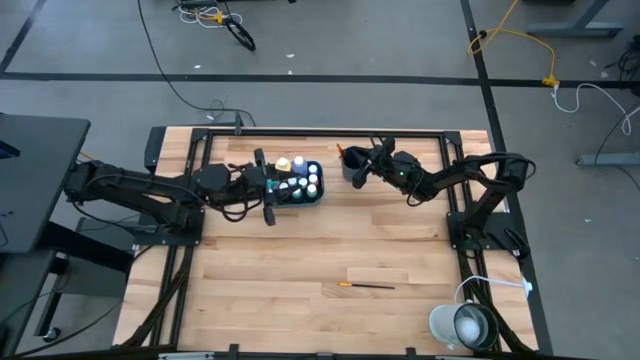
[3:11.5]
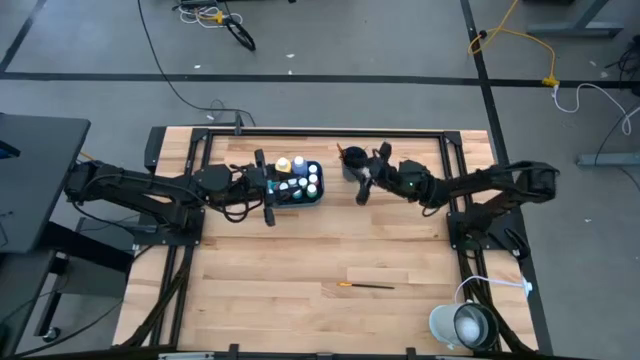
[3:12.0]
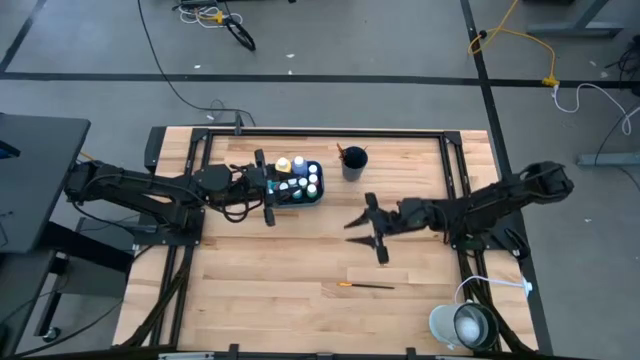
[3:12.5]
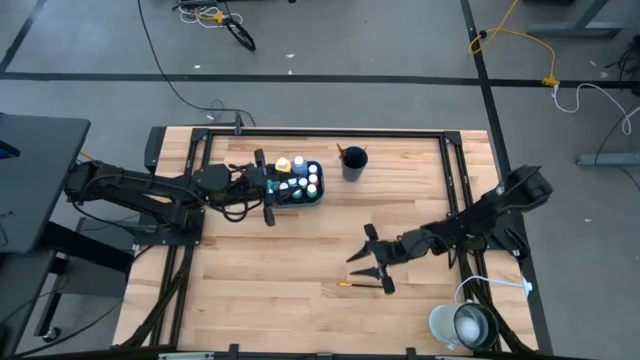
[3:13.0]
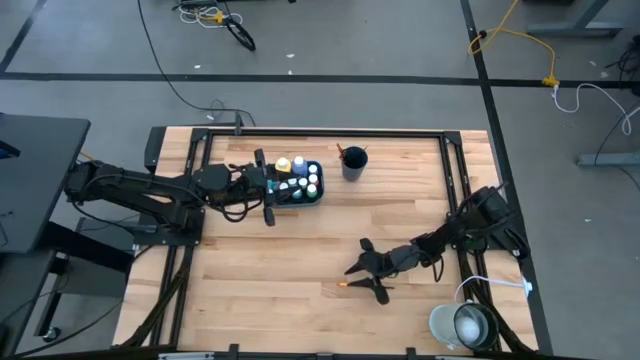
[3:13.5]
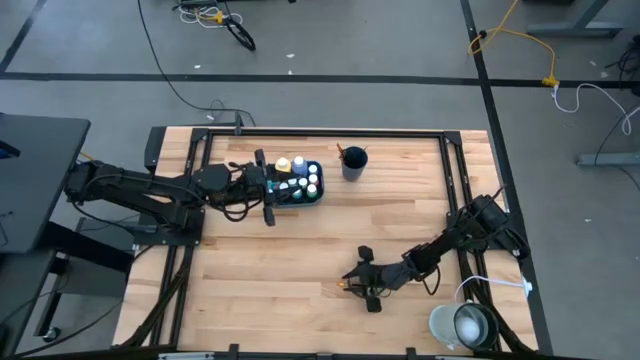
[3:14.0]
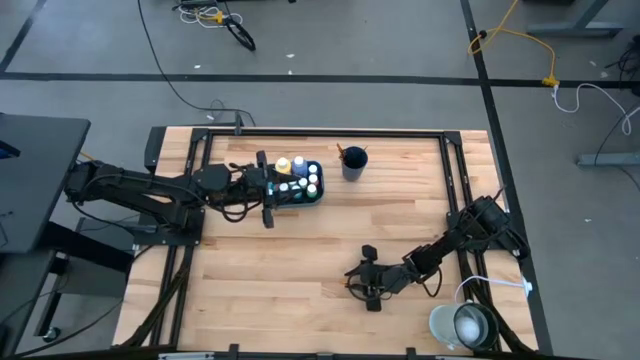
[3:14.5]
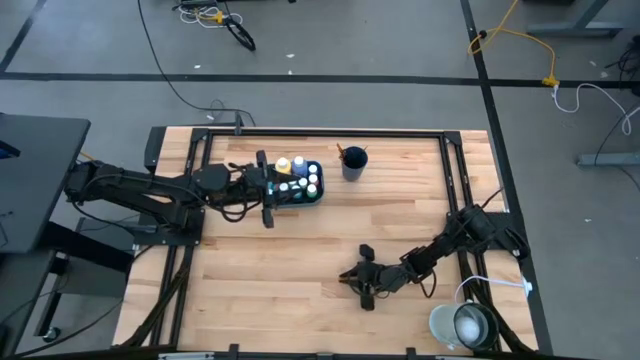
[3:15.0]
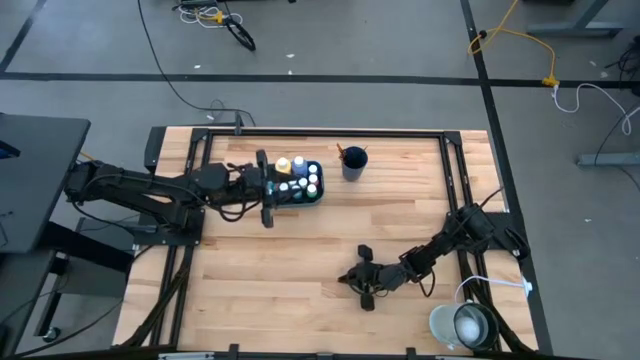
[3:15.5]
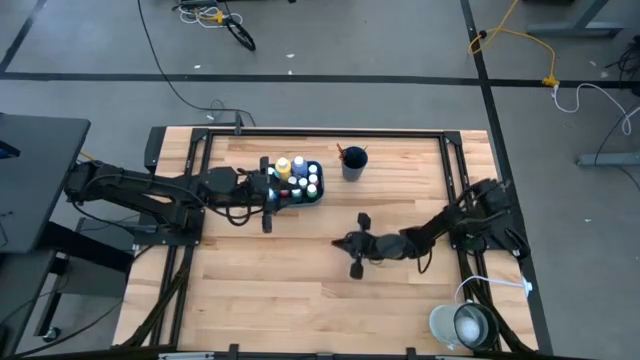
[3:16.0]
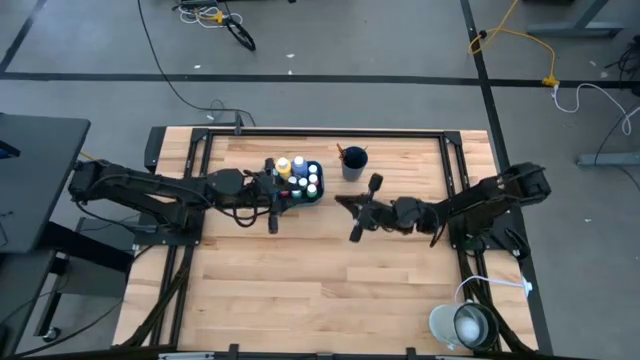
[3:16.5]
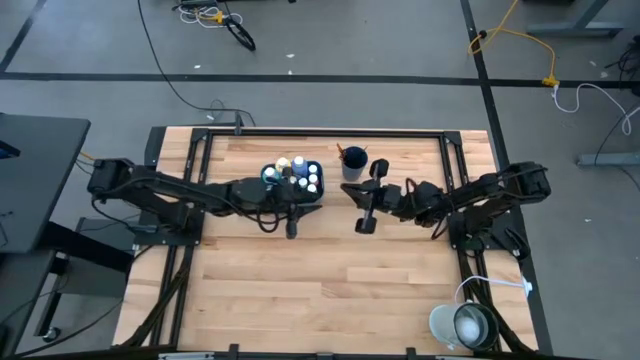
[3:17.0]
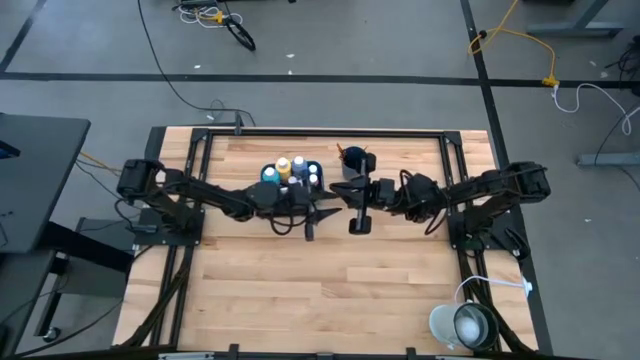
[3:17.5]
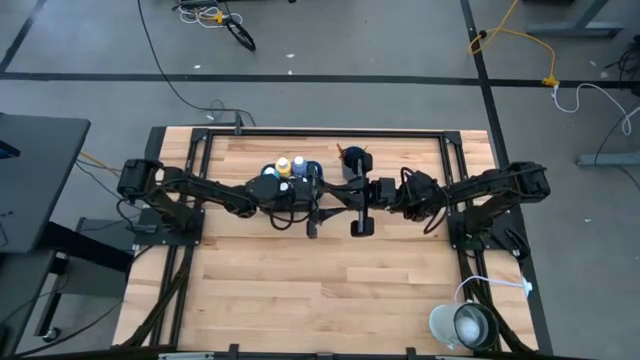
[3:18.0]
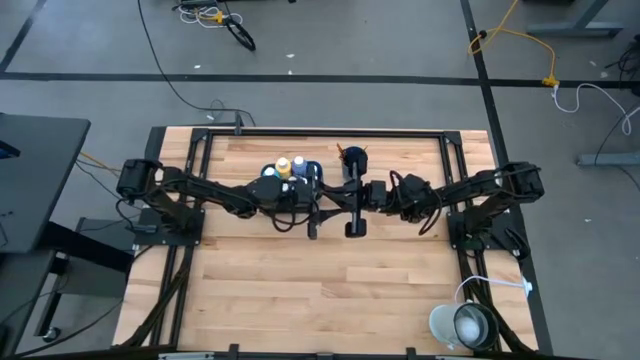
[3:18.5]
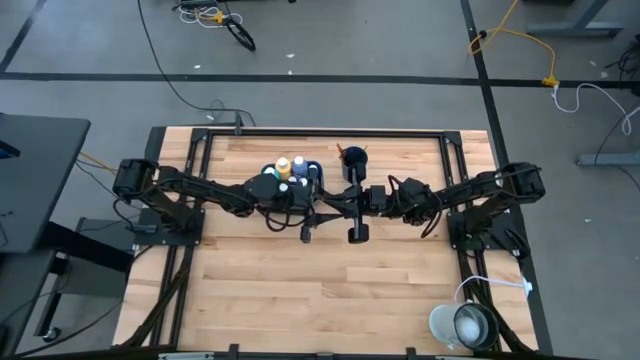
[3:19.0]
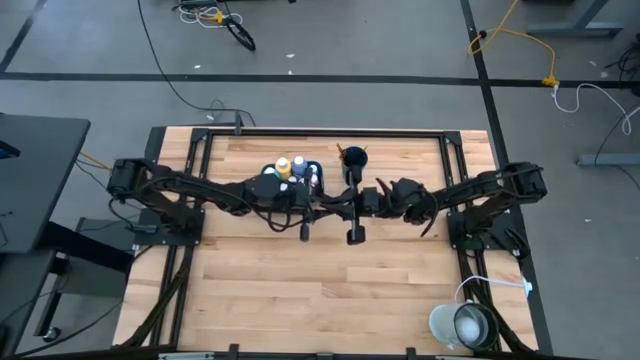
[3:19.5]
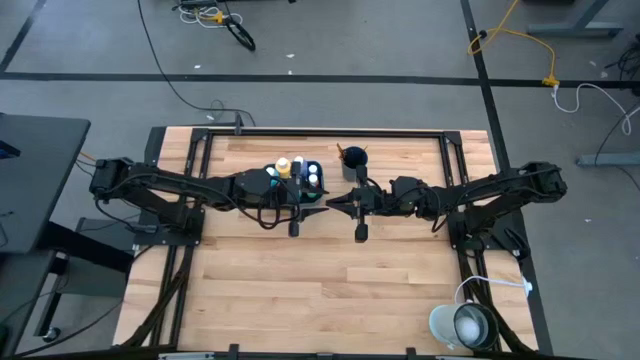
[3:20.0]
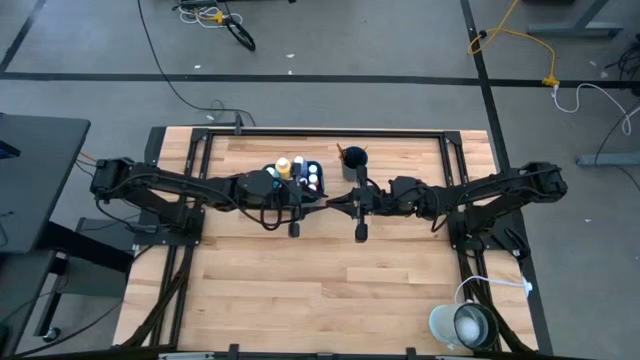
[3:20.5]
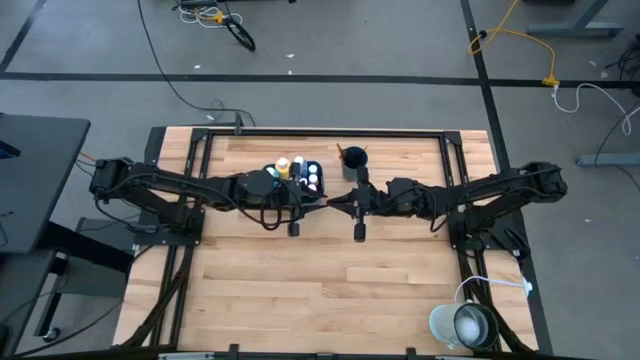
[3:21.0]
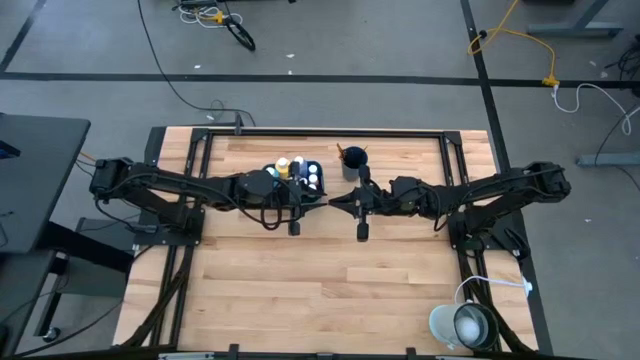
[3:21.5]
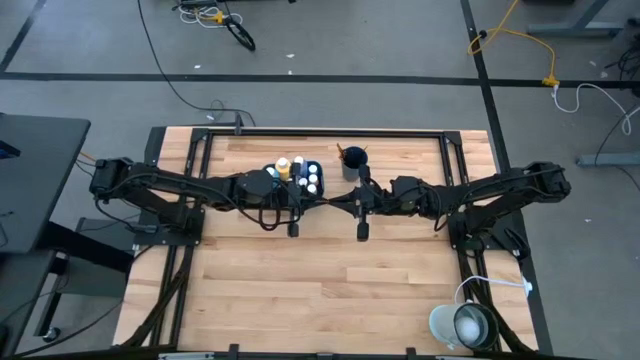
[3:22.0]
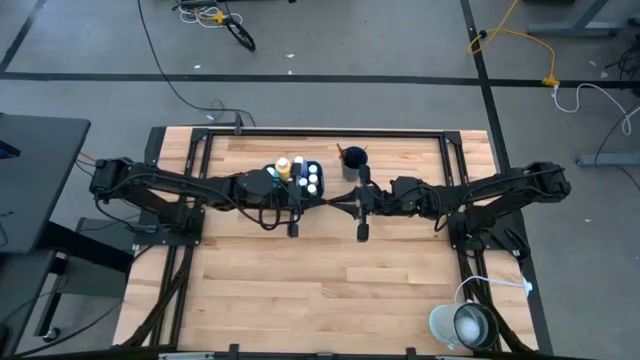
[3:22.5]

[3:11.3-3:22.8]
Task: Pick & Place Paint Supplies
Put the gold paint brush into the blue cup

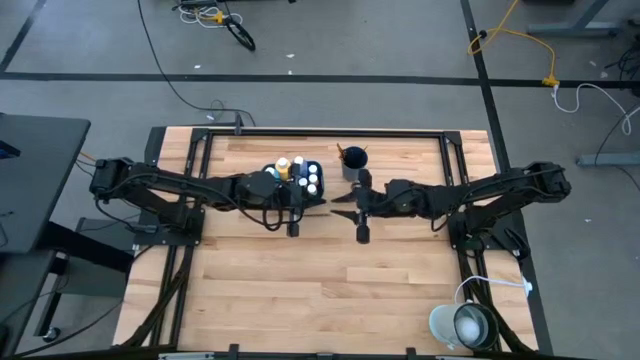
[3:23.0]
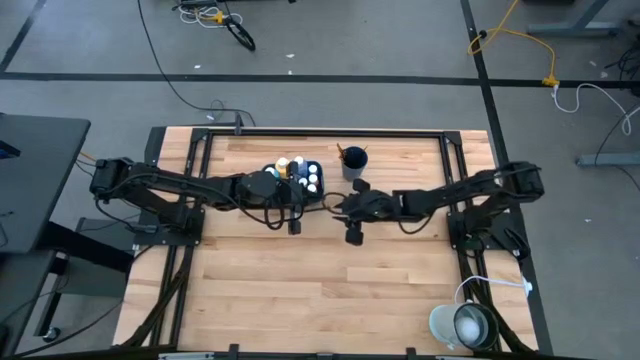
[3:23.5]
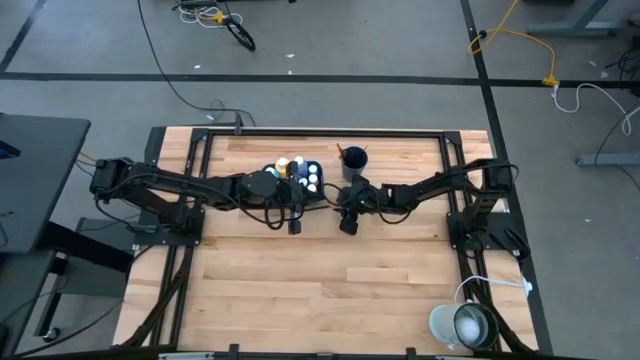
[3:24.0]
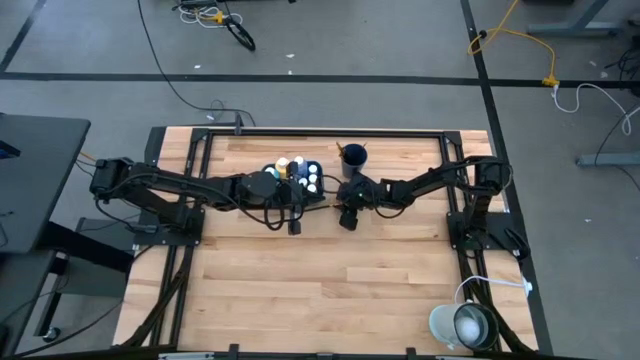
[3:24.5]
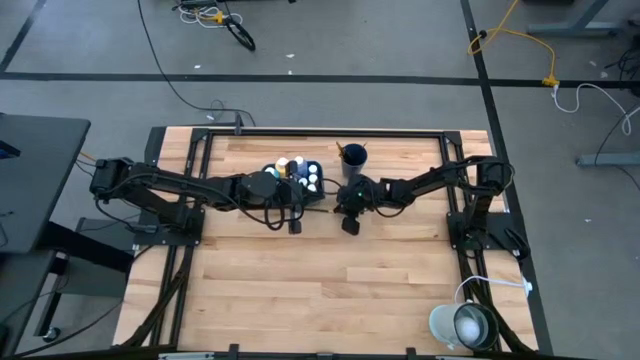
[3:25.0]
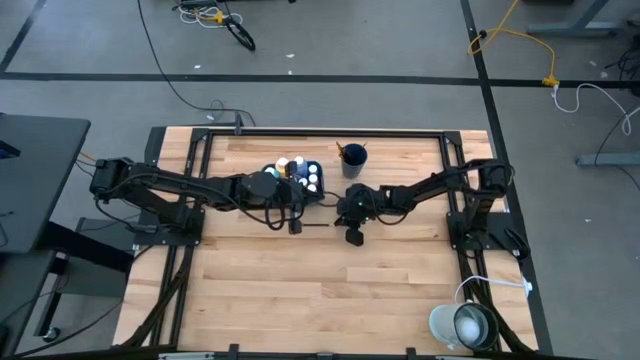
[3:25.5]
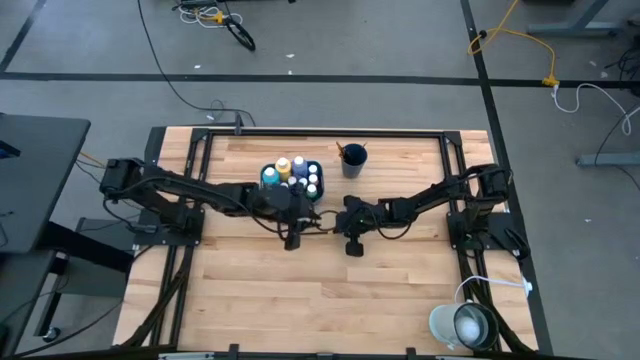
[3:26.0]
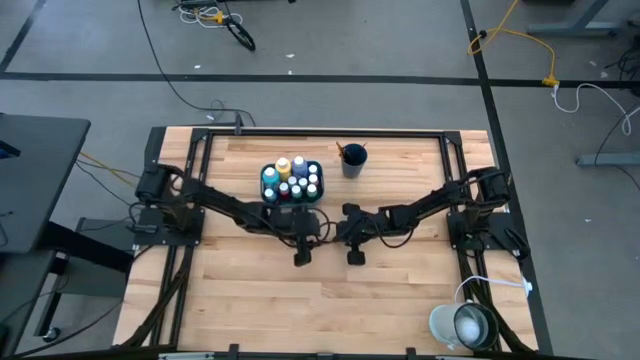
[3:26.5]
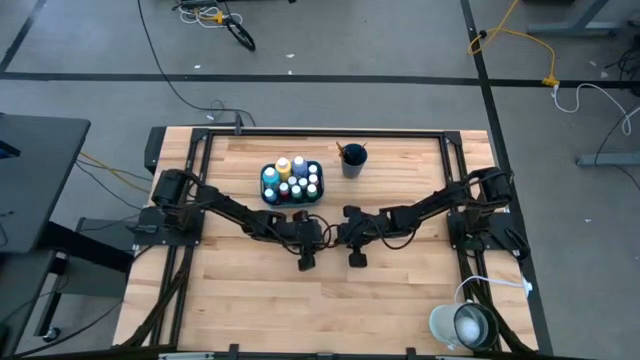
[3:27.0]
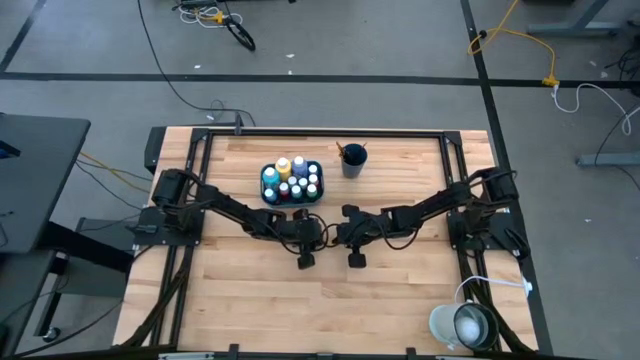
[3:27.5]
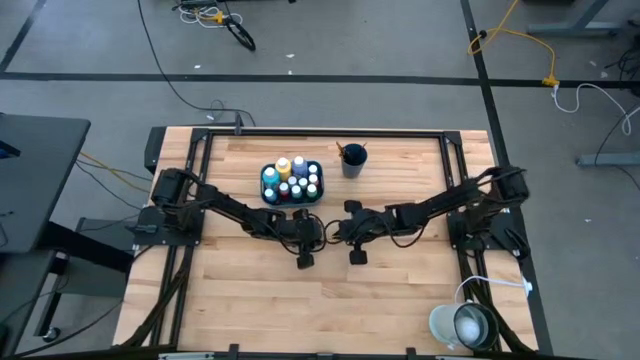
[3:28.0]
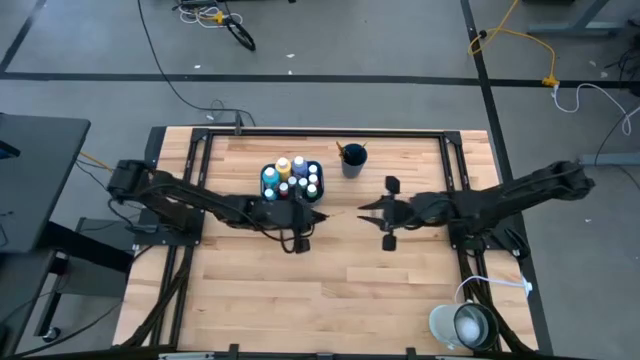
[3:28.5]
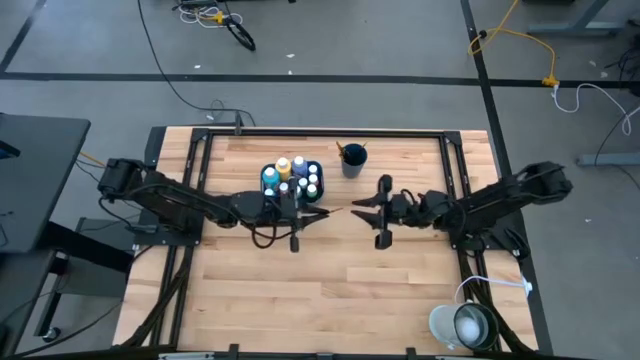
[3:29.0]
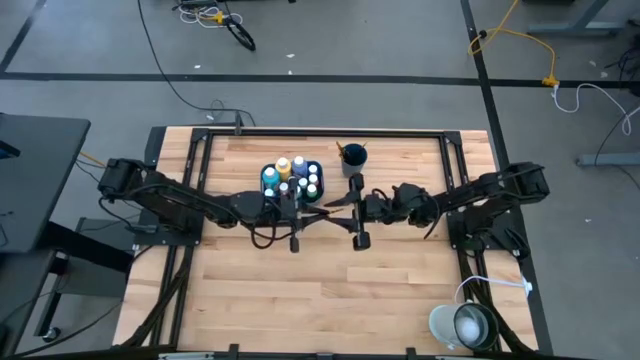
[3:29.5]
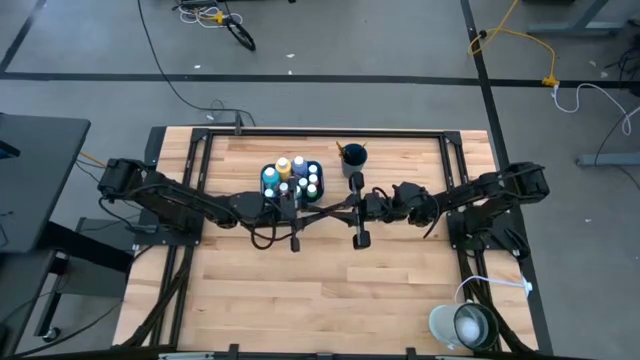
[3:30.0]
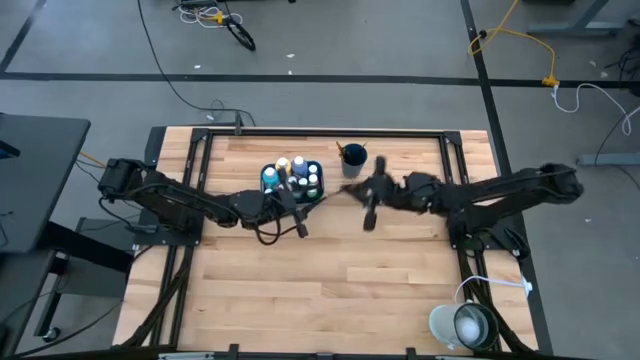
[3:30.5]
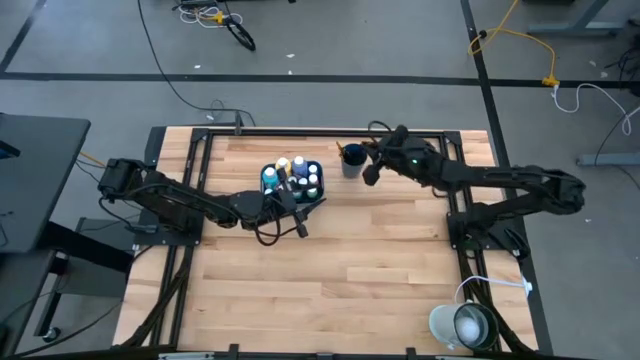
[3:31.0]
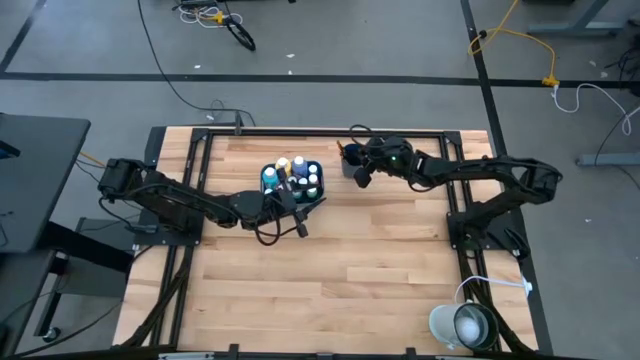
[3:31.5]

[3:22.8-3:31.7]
Put the gold paint brush into the blue cup
